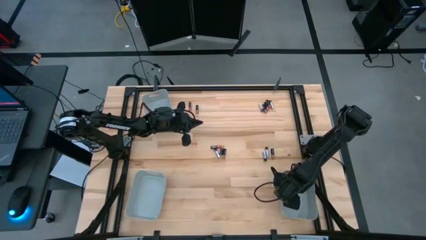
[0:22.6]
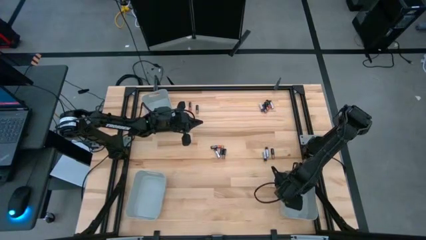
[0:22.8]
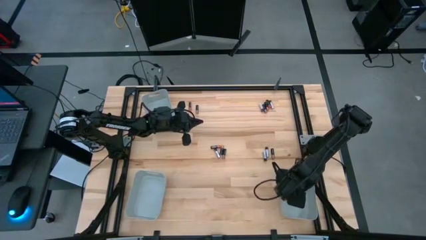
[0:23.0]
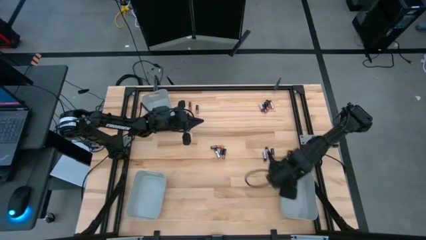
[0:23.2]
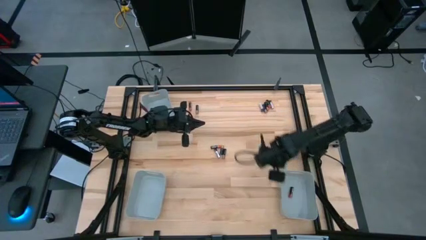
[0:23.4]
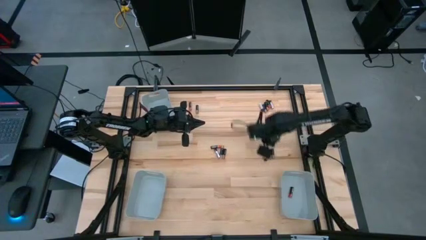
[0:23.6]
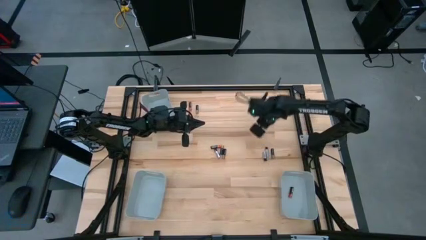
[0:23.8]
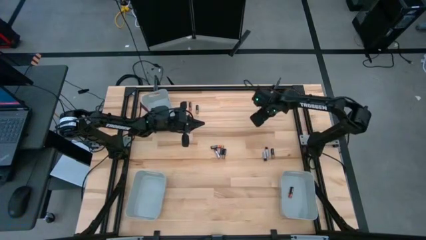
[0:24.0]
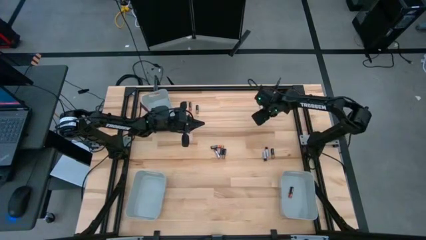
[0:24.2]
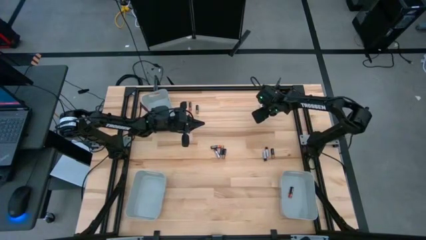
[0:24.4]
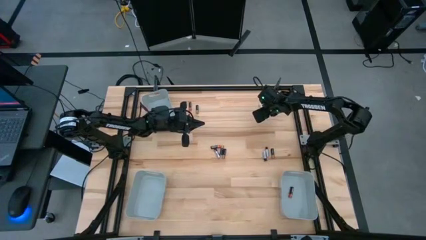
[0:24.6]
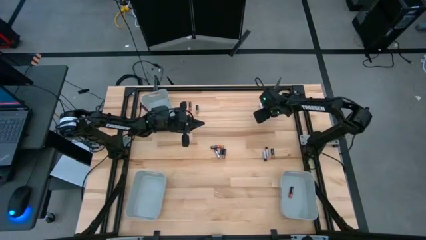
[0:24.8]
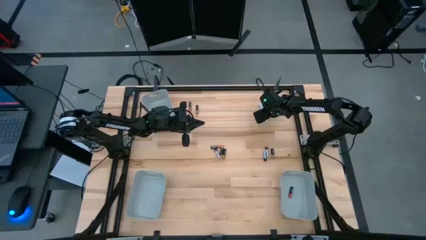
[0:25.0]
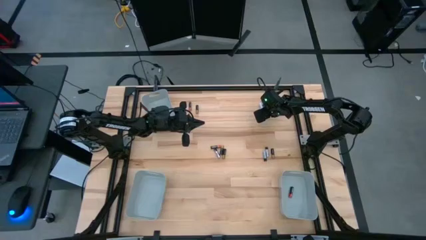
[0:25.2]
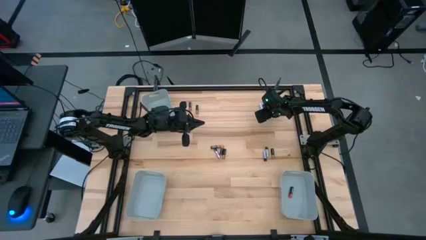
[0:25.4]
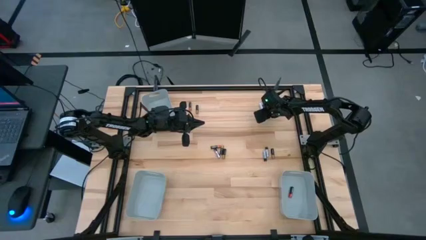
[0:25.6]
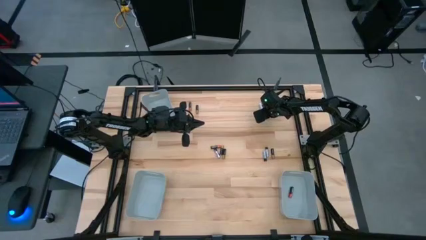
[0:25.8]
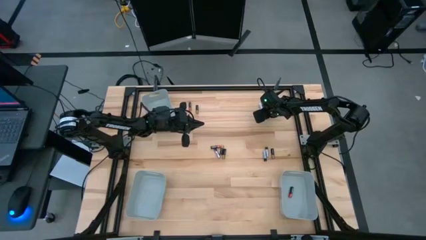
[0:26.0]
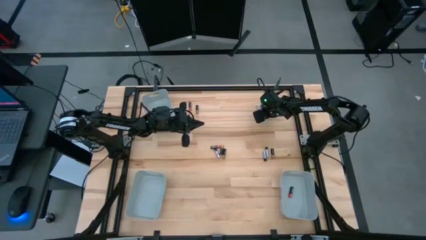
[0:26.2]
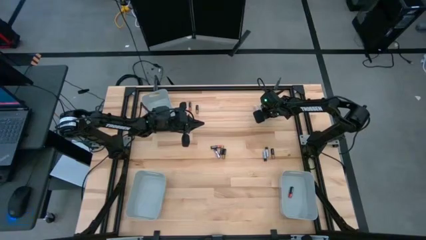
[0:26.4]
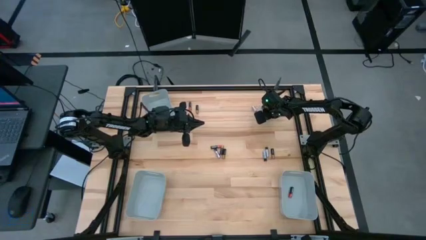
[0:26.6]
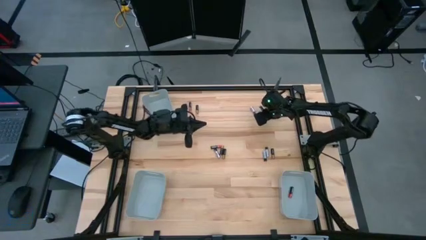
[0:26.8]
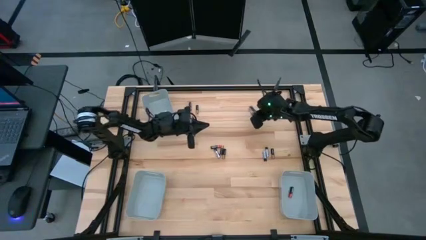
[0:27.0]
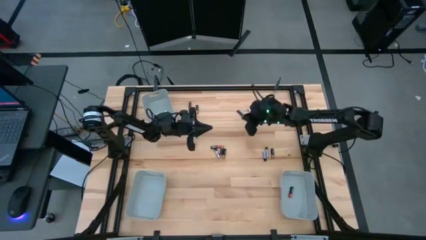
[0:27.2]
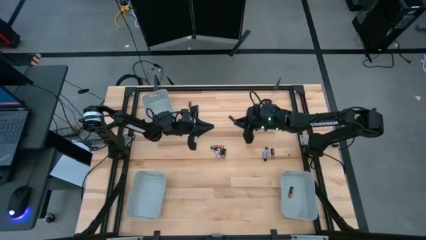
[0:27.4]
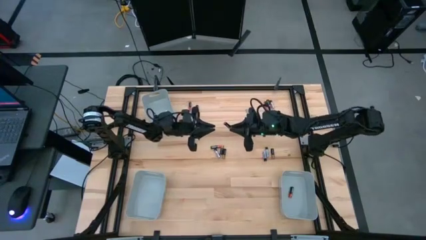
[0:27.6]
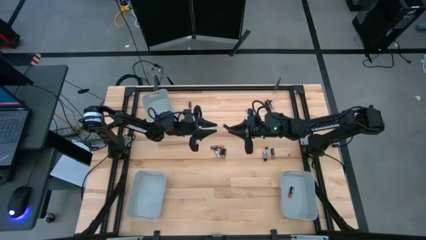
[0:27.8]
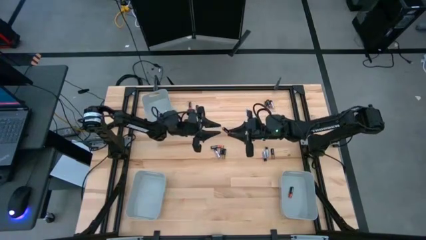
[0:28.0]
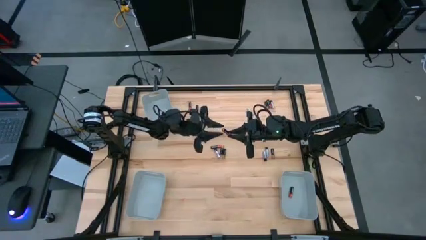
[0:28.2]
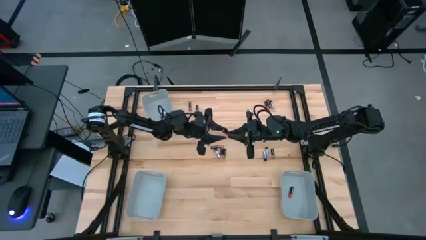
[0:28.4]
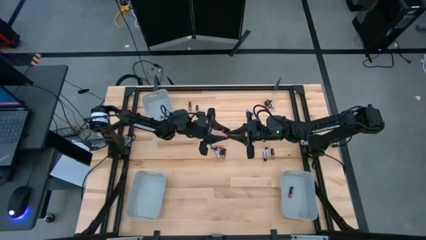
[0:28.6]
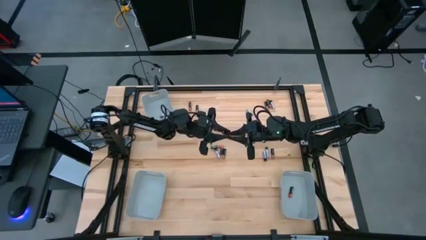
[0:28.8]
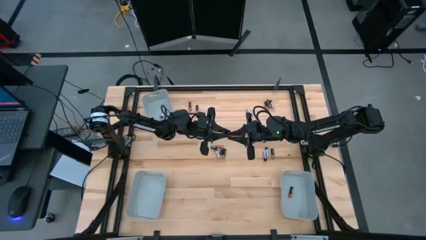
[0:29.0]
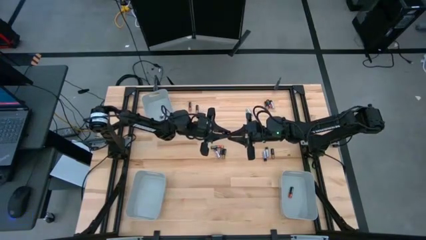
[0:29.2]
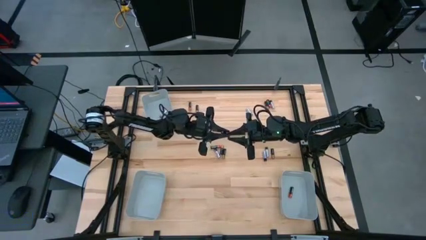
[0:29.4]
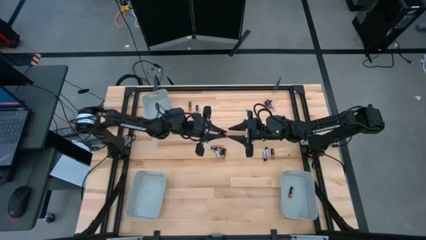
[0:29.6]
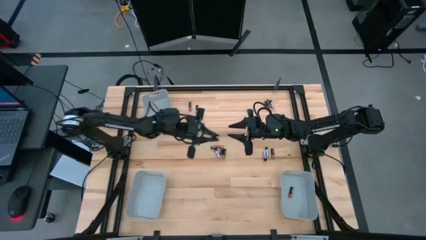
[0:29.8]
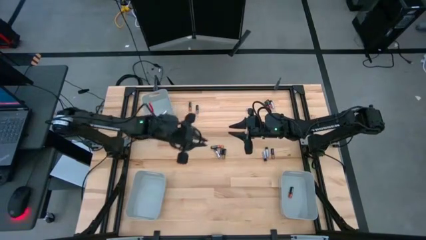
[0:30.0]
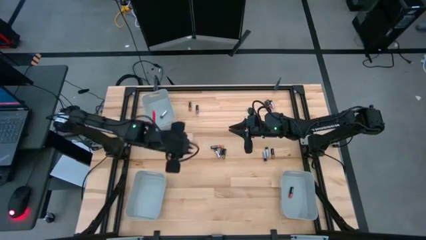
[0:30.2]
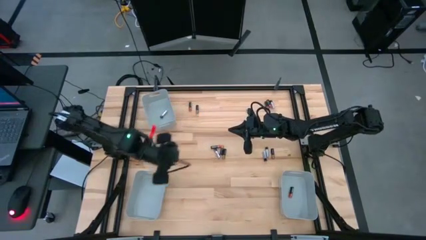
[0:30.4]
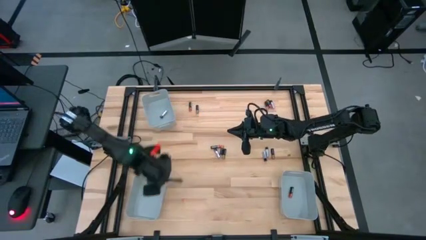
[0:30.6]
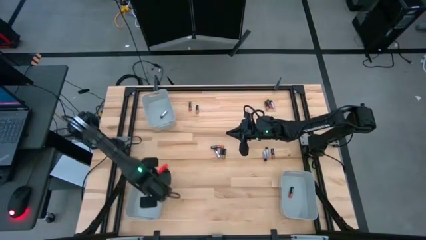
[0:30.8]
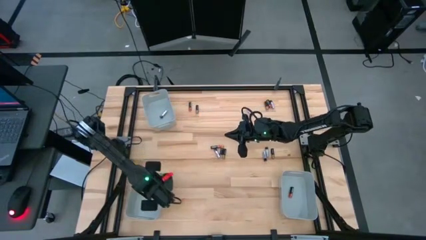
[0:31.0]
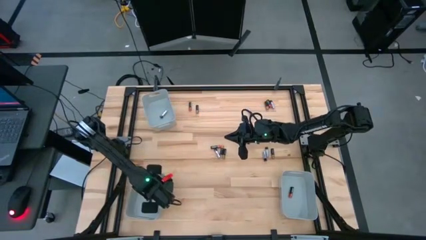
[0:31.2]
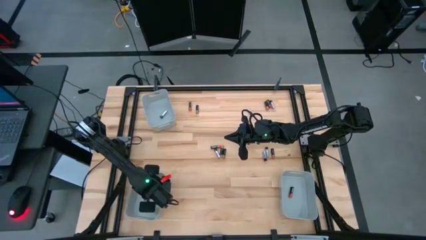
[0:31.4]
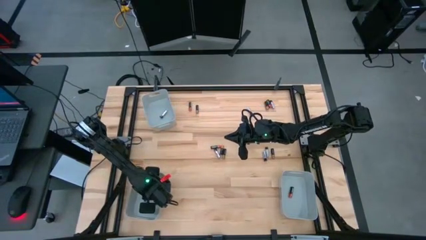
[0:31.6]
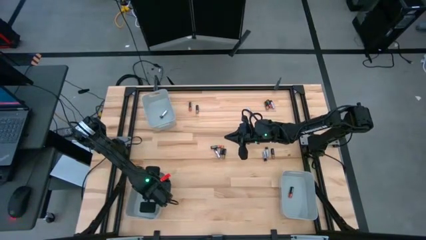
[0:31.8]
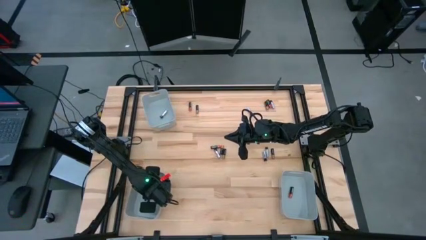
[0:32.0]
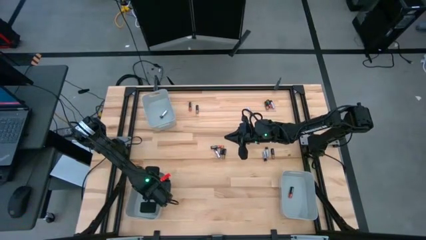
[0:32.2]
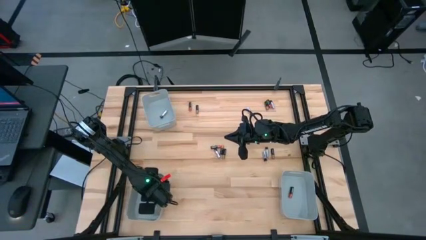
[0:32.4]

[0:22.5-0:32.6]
Task: Sort batteries
Put the black-brown battery into the bottom left gray bin

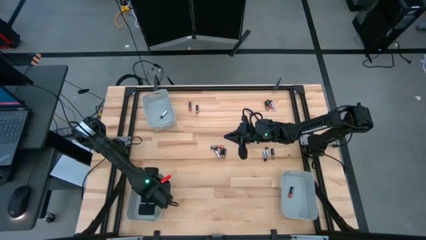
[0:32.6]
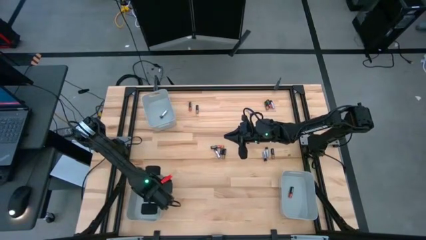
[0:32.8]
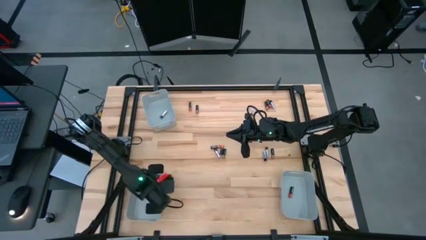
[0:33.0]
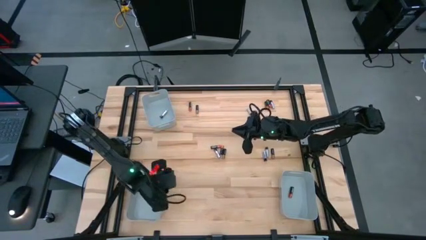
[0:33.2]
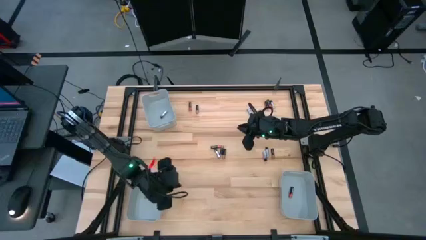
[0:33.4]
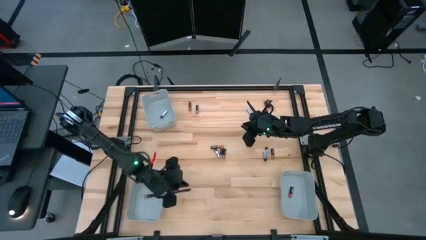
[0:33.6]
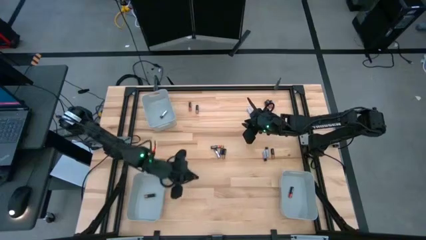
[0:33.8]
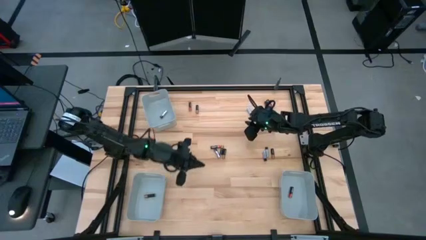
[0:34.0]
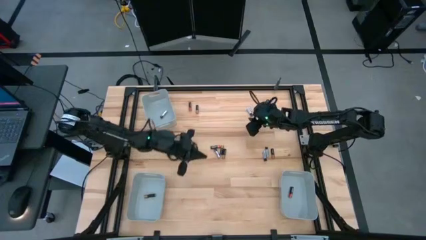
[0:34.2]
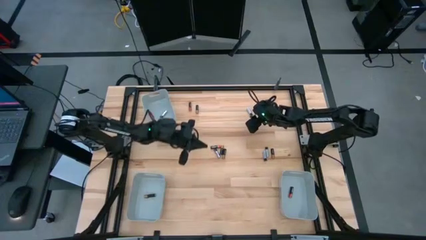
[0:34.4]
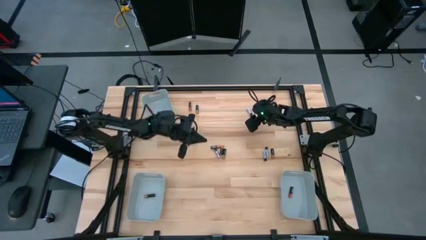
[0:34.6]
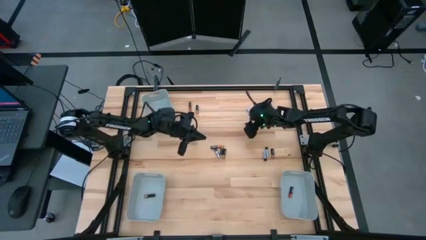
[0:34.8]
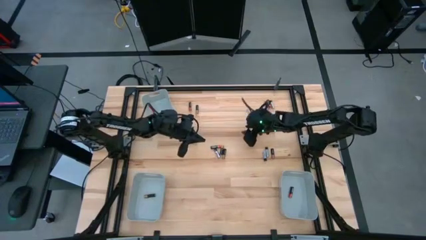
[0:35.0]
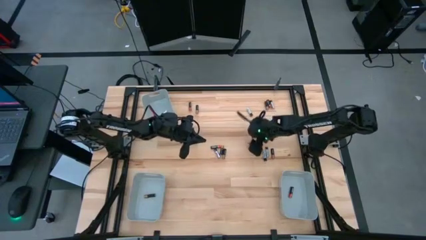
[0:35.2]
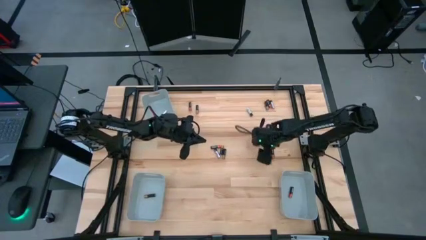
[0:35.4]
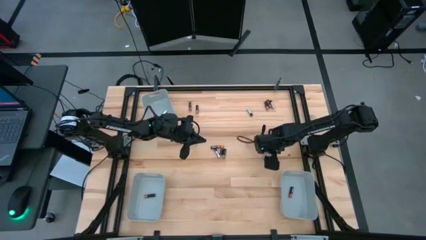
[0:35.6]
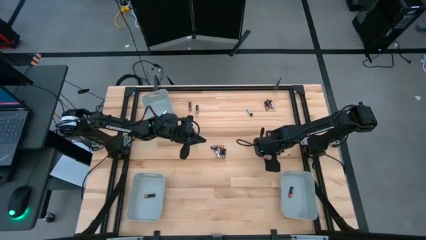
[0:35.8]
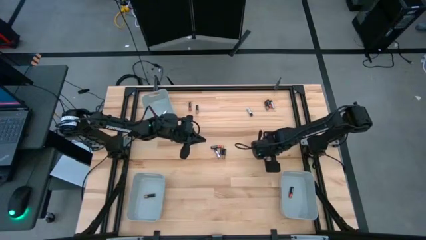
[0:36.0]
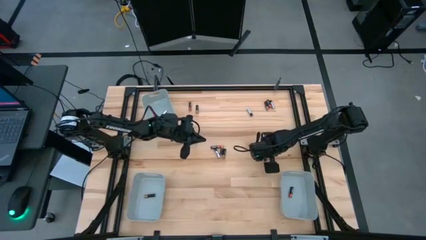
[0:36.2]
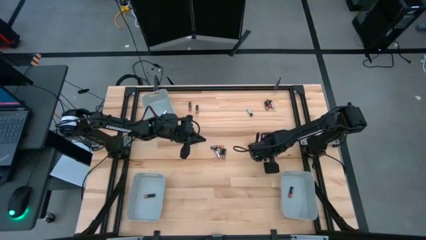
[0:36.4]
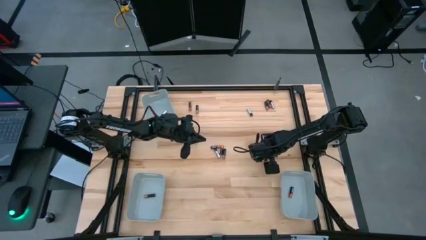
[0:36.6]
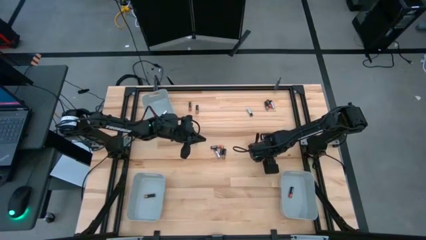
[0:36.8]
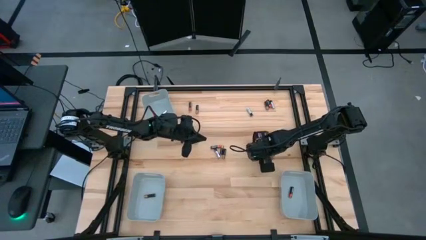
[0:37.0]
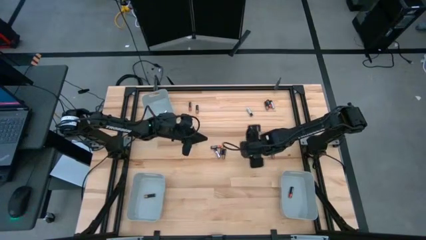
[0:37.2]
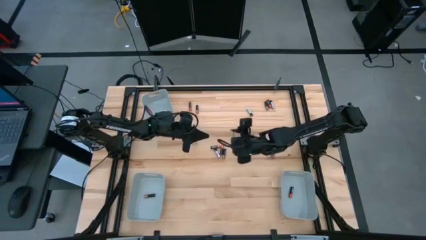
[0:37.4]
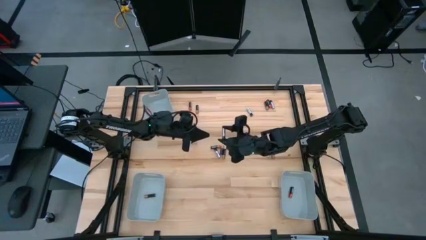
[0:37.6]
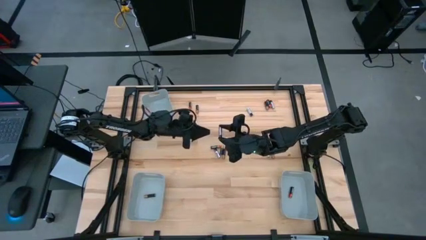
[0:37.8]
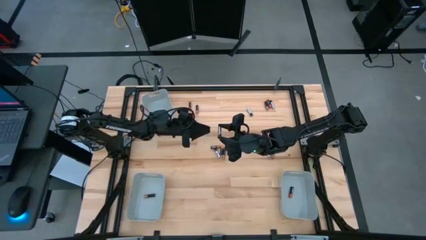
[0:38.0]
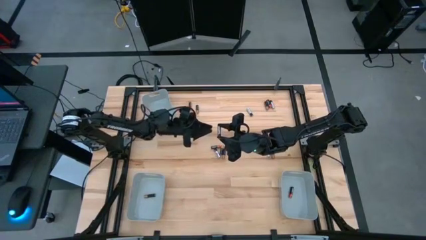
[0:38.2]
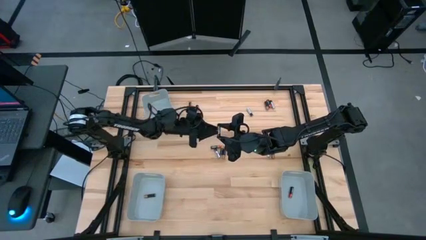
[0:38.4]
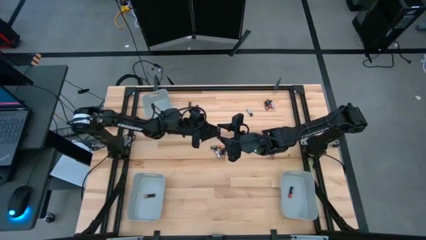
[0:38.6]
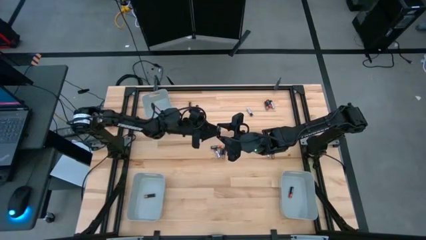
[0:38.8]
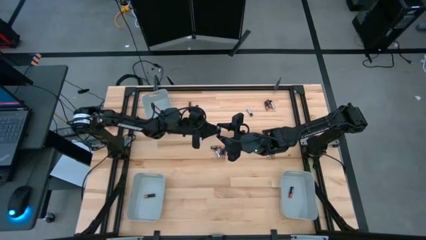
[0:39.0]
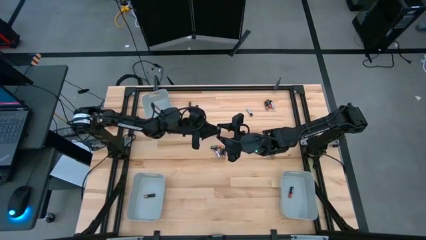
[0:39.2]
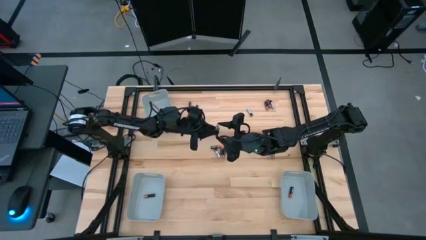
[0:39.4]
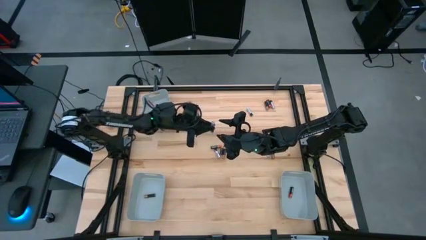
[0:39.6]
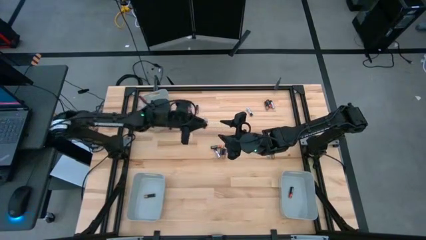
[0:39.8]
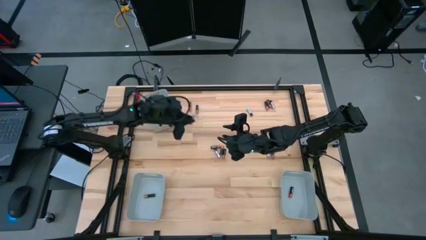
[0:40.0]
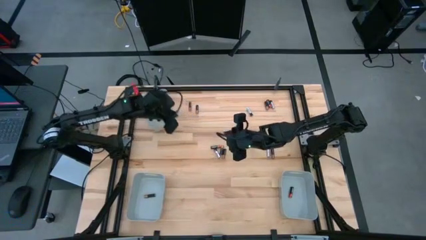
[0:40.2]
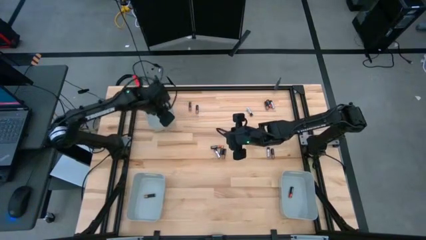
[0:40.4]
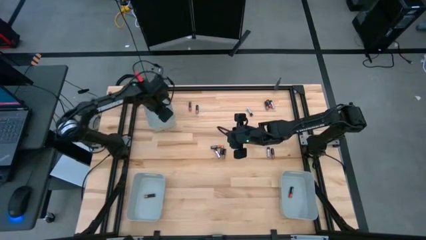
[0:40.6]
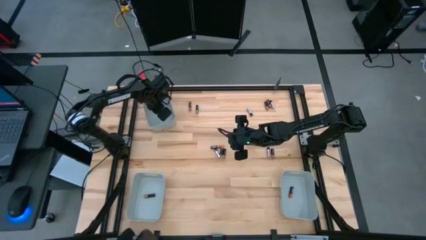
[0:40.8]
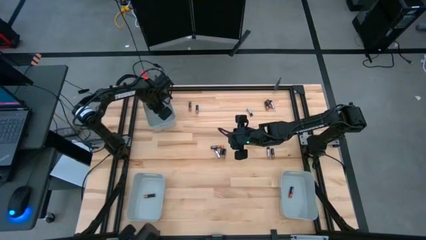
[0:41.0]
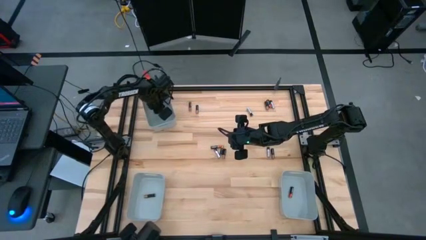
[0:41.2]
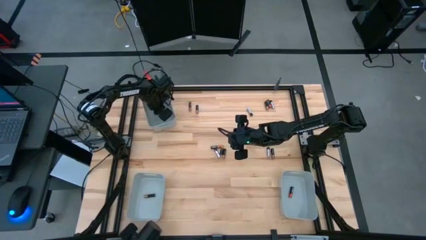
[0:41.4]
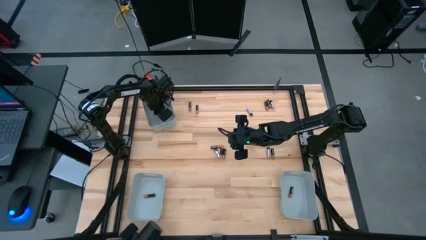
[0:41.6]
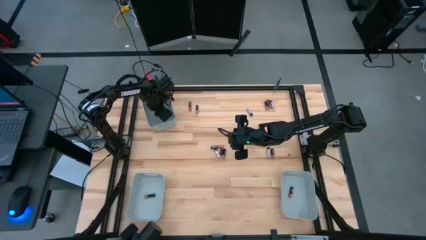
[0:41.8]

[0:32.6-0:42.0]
Put the silver battery into the top left gray bin
